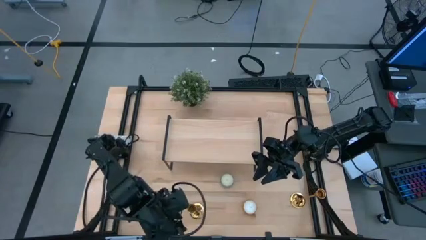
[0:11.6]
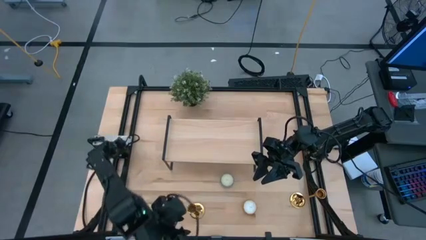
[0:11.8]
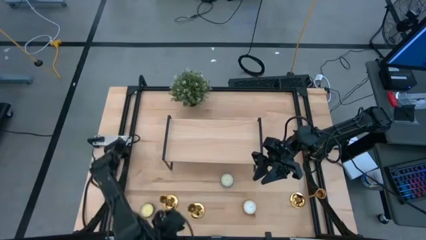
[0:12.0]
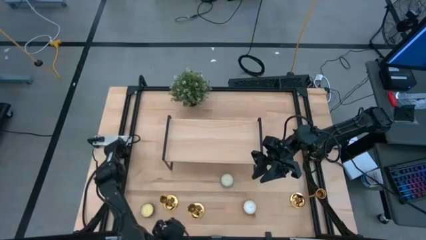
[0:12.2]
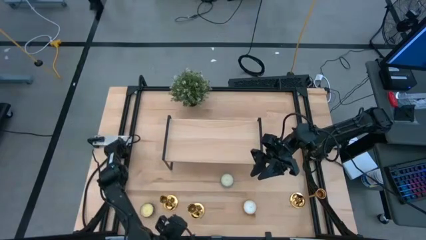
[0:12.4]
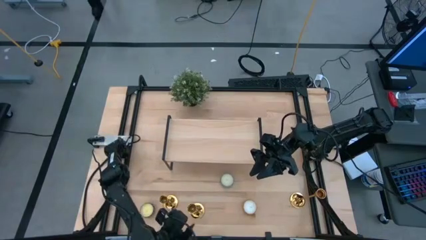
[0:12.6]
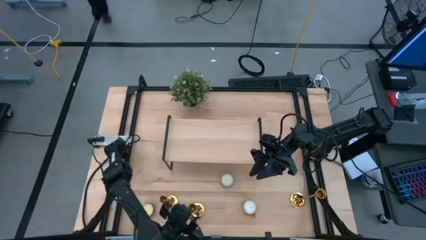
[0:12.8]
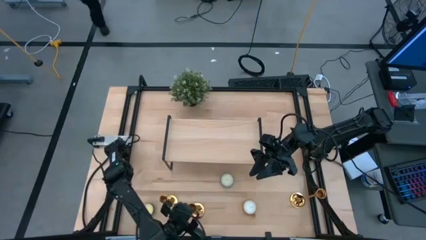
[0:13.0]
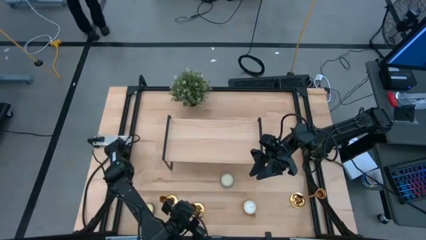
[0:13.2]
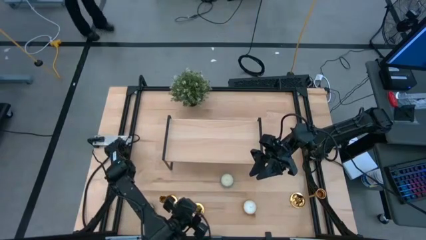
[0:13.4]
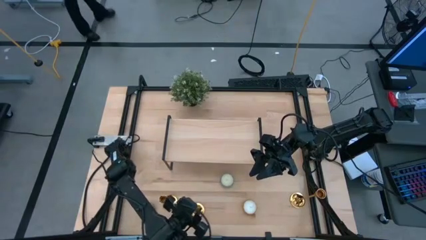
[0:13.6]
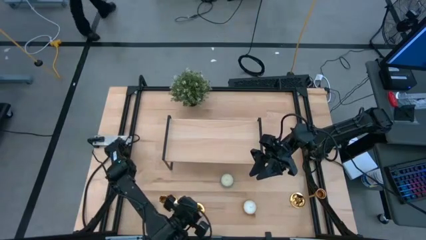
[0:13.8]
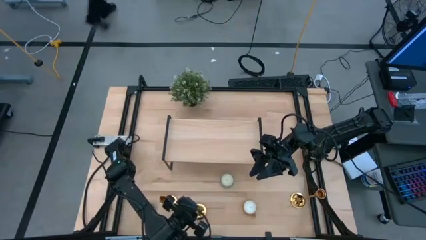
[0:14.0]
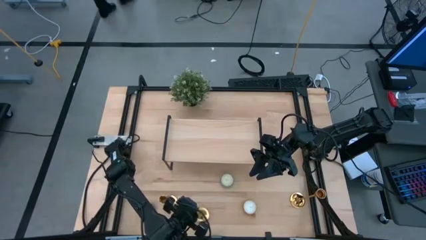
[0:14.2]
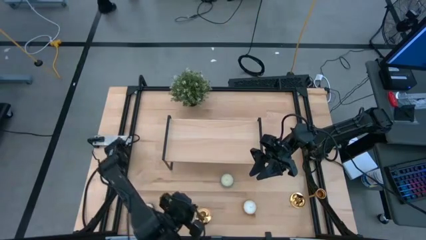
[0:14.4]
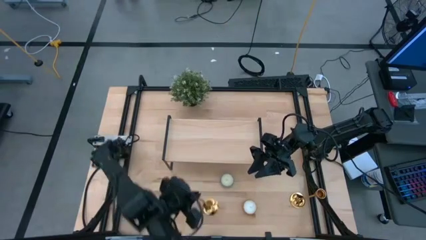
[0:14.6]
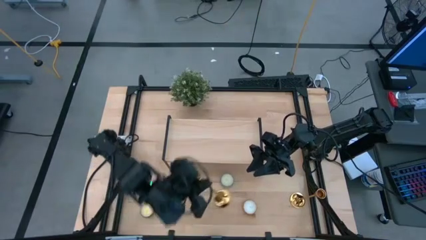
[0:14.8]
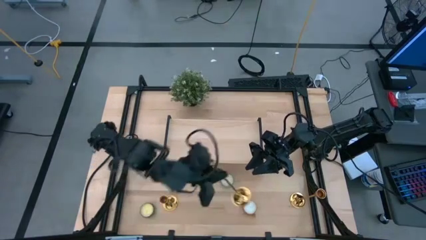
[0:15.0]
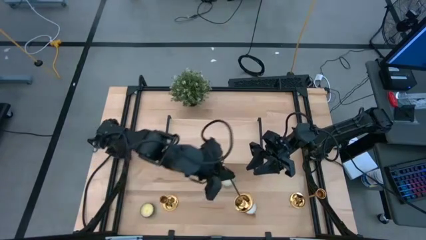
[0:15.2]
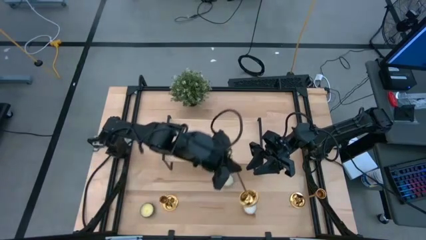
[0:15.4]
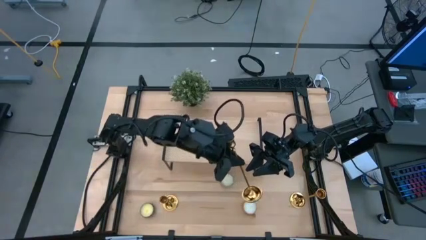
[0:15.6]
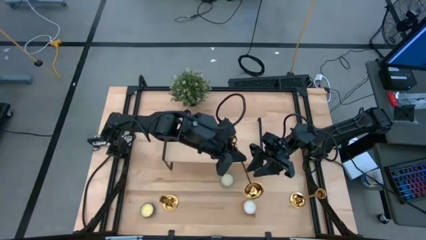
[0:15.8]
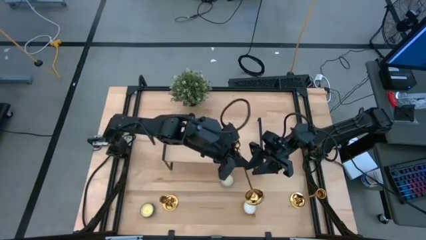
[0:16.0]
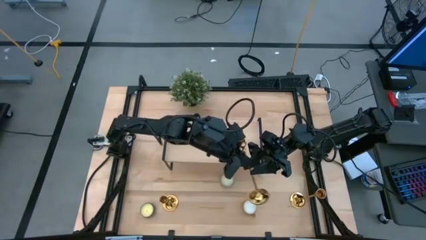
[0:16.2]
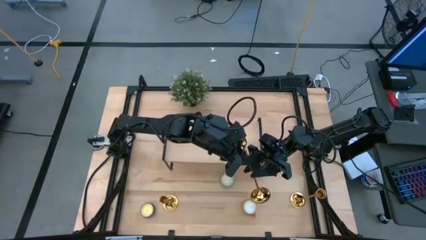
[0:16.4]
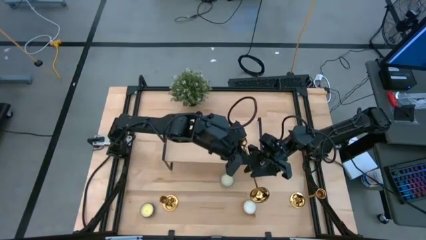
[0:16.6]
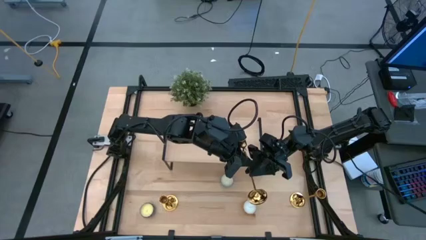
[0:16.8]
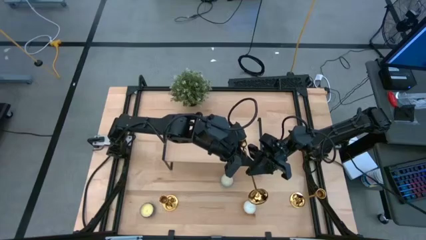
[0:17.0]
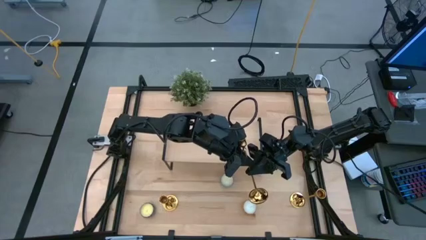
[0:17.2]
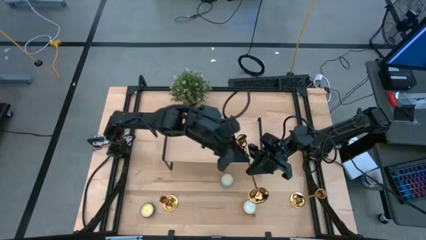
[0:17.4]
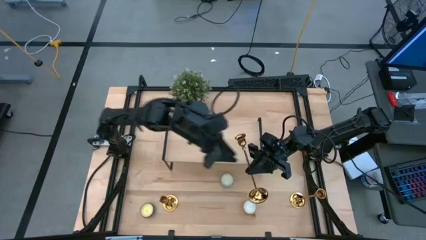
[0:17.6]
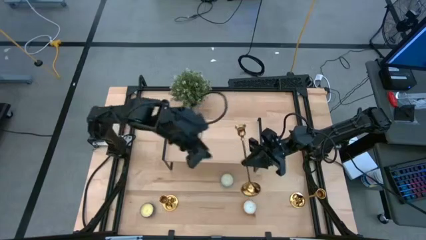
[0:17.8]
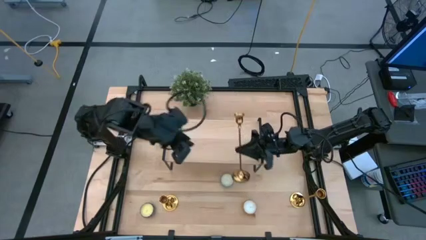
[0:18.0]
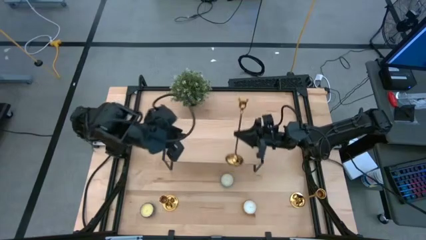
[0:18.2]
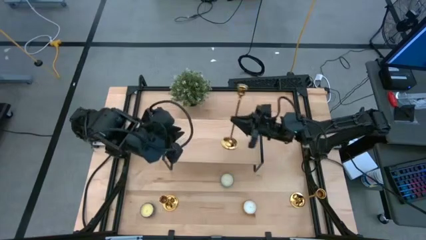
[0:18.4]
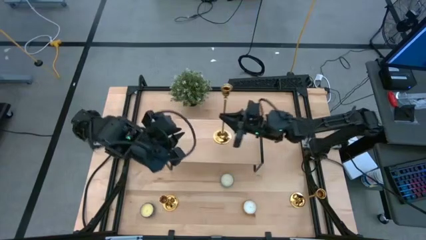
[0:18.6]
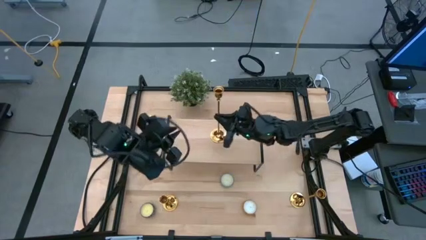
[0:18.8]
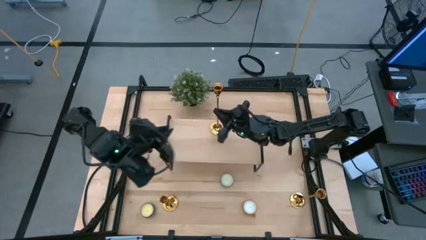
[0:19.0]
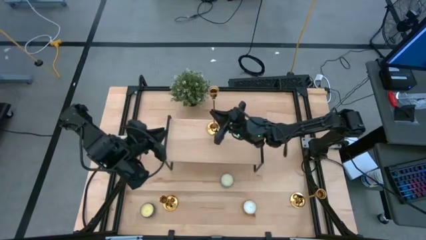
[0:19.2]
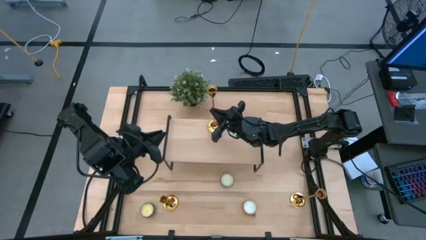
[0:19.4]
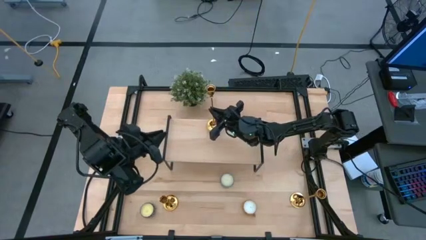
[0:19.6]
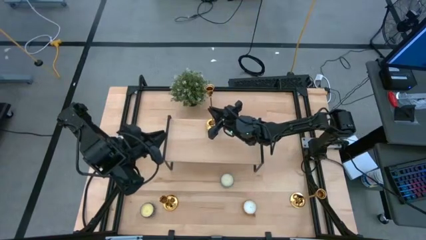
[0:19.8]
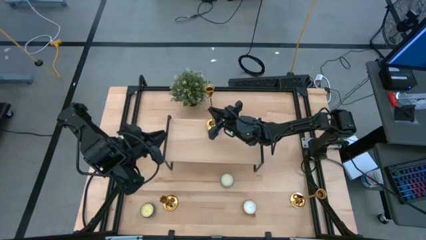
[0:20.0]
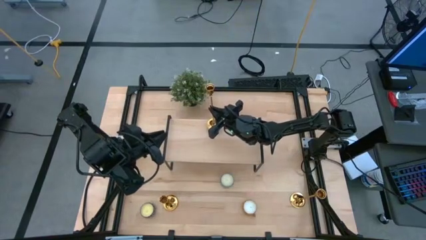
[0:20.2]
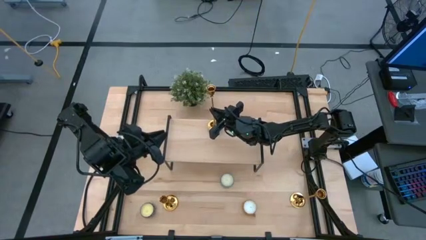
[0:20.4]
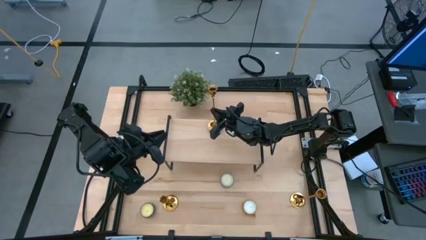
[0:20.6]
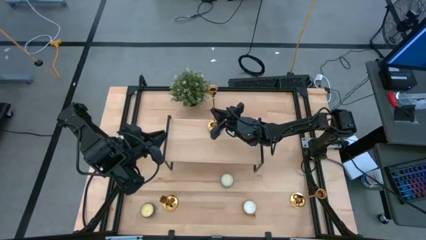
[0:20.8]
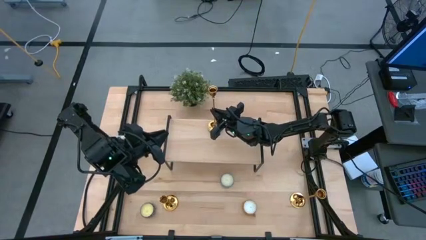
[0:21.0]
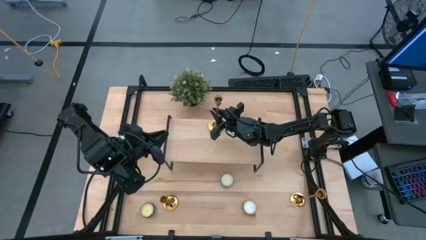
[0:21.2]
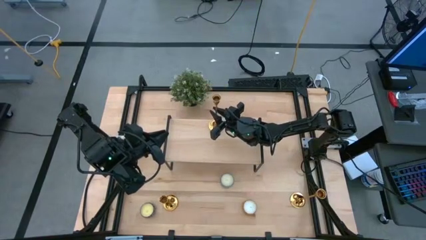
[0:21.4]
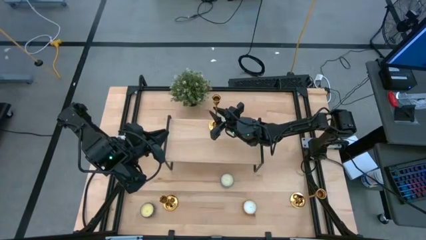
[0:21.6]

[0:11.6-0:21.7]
Task: Stock candles and holders on shelf
Put the middle gold candle holder on the shelf

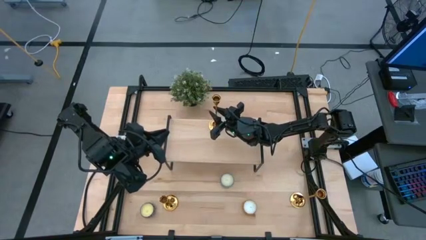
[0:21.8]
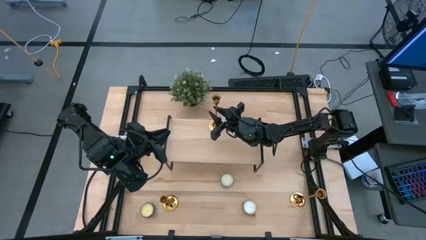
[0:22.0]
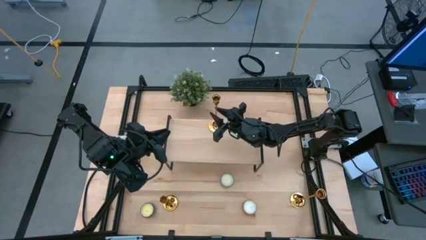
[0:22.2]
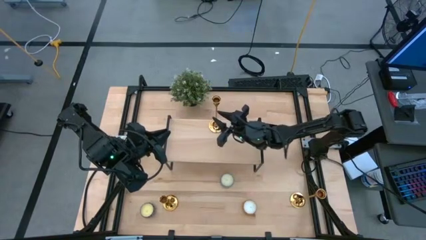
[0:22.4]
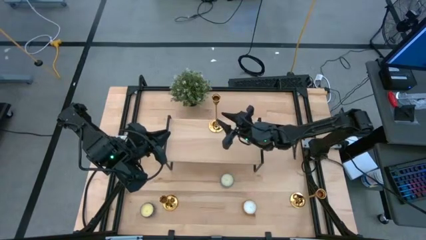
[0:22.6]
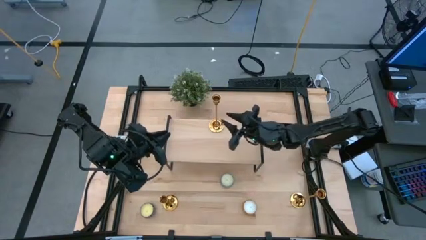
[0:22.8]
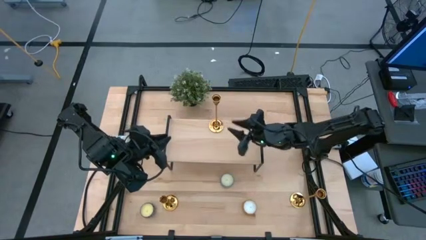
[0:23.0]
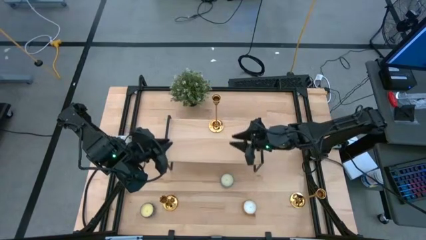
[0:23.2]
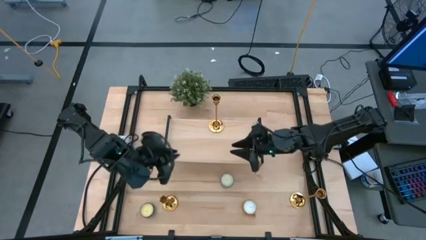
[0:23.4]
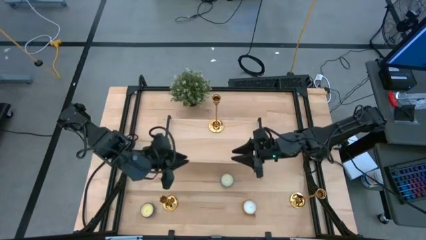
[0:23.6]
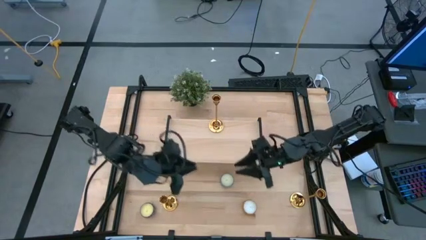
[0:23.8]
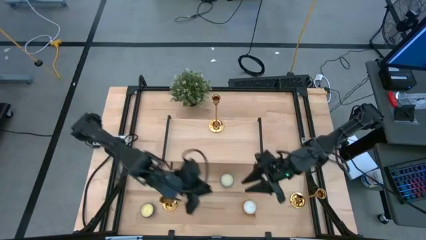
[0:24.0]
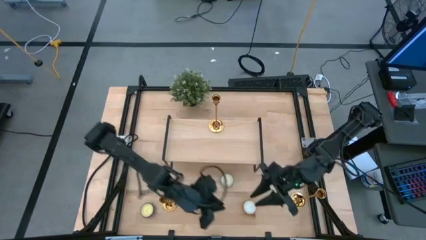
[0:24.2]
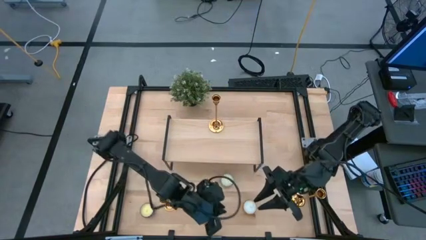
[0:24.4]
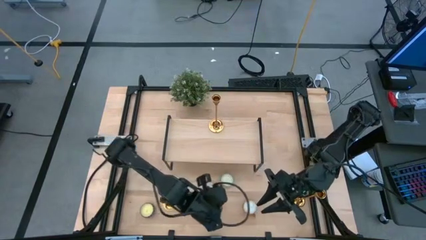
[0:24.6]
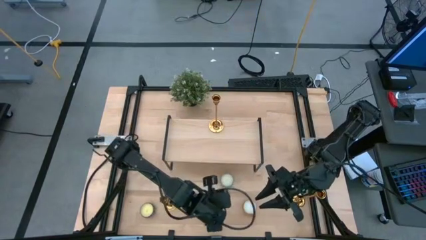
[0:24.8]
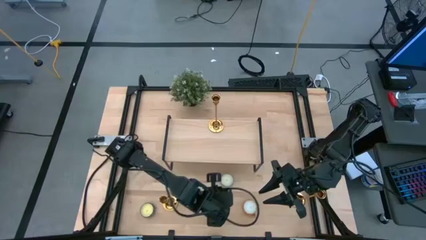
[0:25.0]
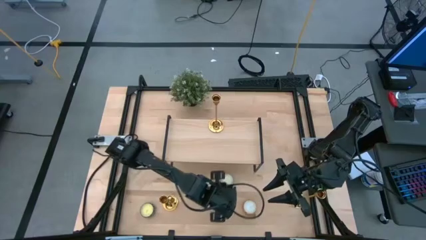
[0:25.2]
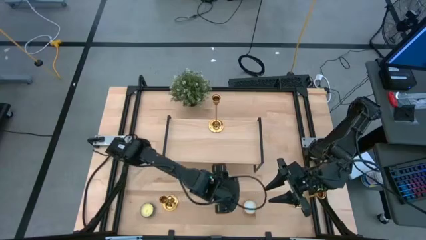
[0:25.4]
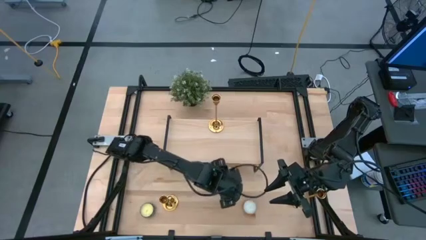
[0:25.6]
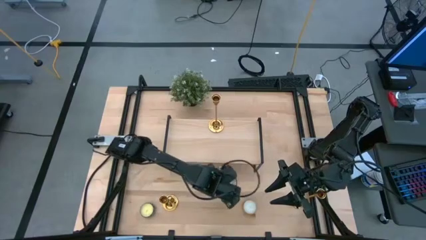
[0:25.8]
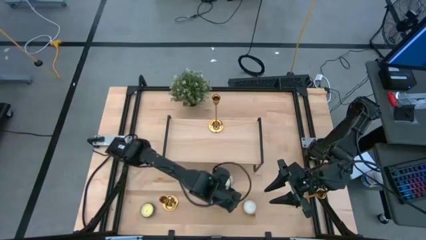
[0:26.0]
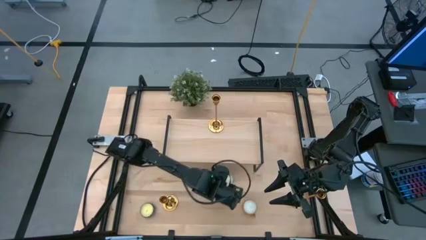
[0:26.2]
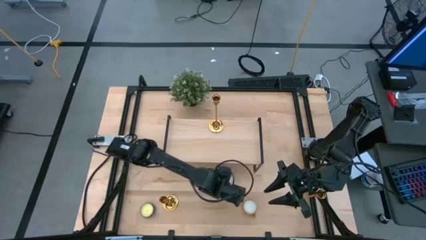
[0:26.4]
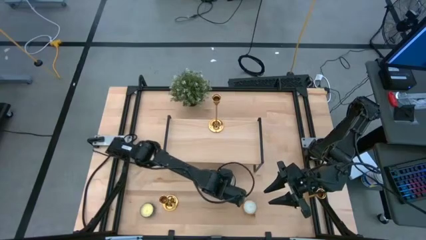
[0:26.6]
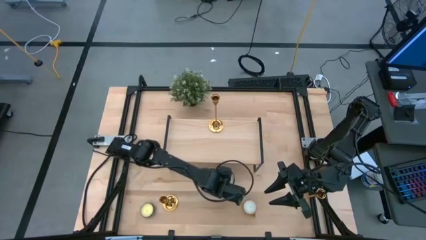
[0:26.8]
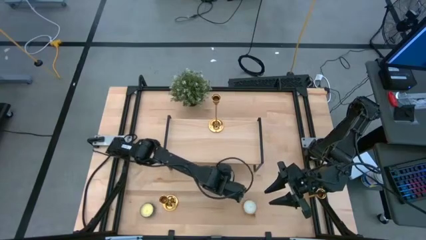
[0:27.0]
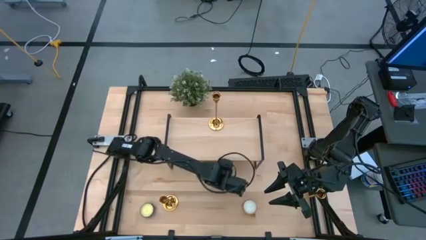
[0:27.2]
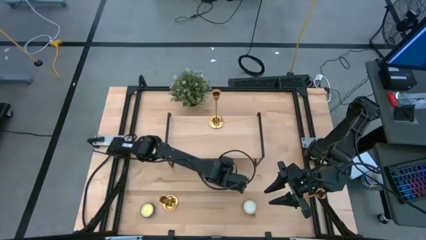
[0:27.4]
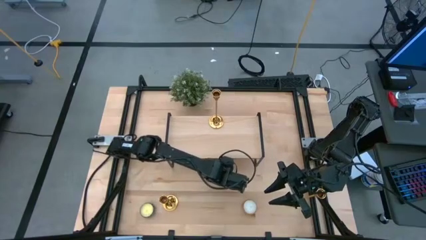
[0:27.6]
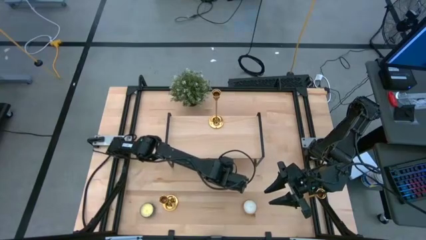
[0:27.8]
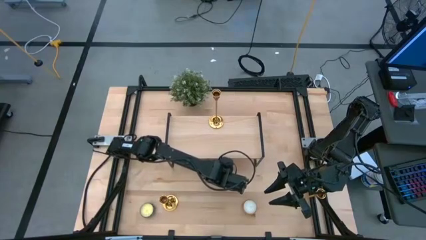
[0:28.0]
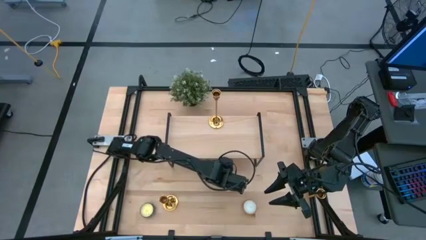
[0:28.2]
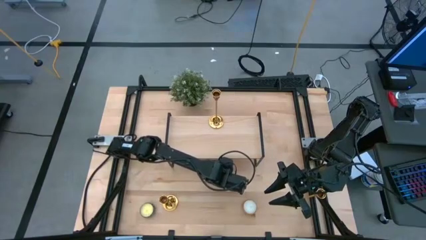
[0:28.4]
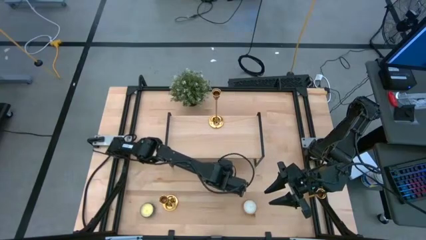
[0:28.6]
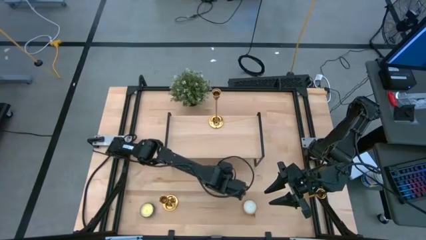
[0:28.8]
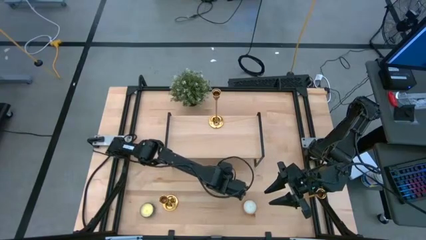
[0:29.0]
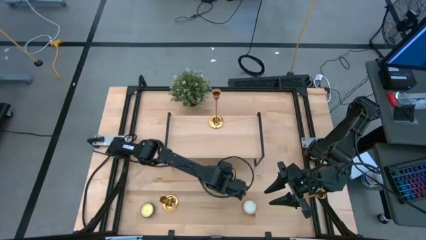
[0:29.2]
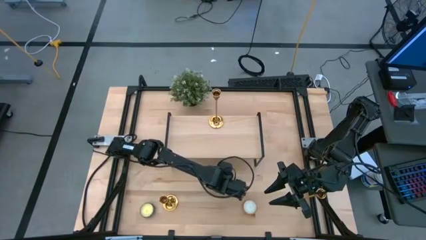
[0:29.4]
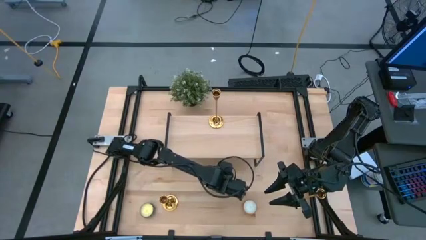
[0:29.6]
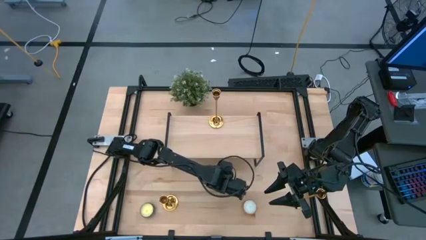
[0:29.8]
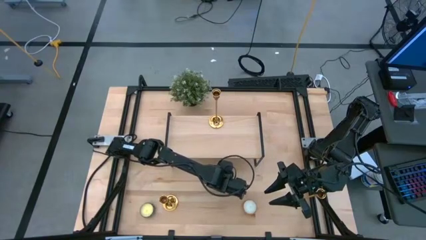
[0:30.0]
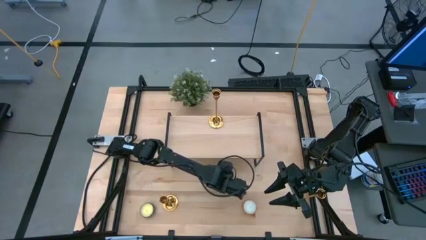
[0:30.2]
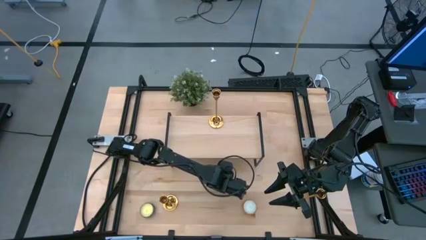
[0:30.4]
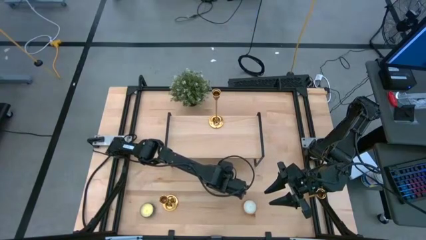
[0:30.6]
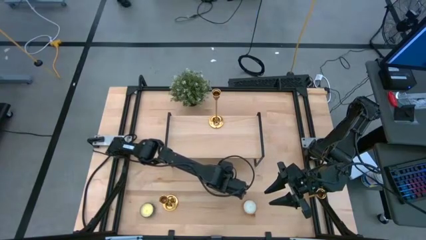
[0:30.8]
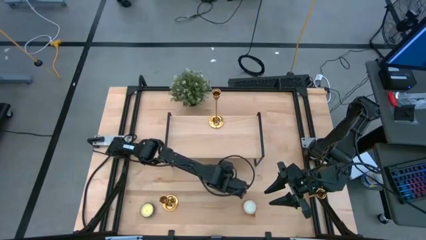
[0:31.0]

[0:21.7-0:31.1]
Put the blue scented candle on the shelf
